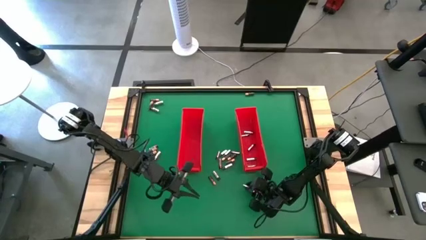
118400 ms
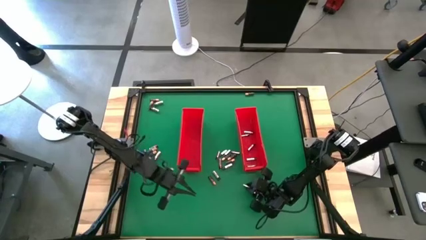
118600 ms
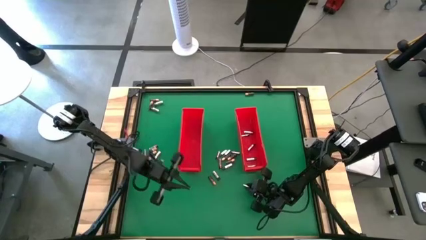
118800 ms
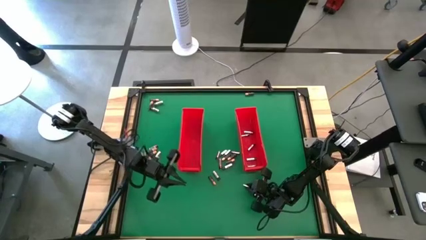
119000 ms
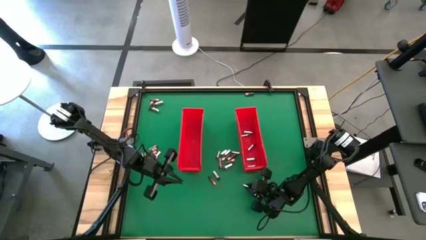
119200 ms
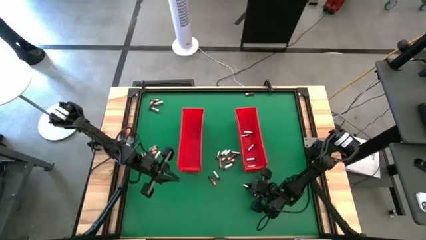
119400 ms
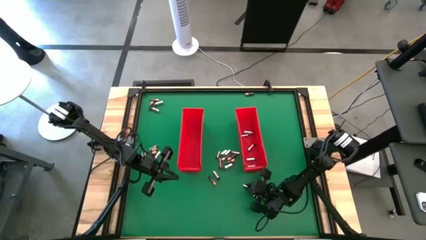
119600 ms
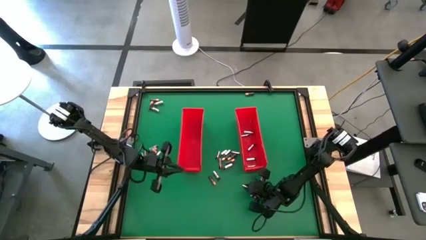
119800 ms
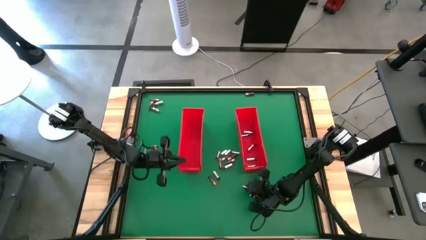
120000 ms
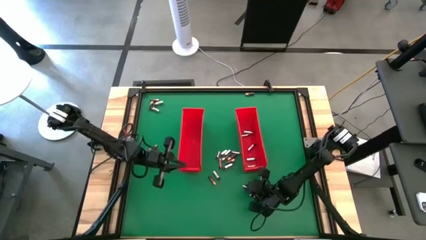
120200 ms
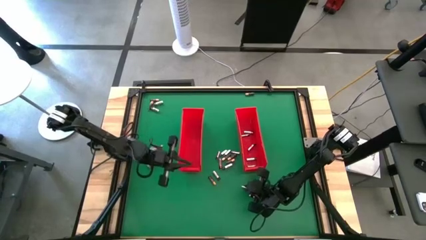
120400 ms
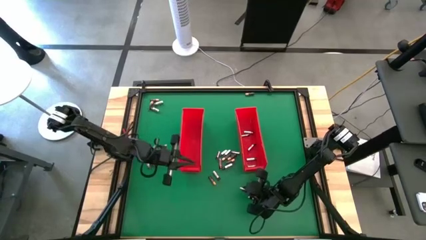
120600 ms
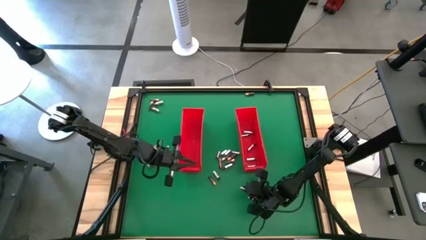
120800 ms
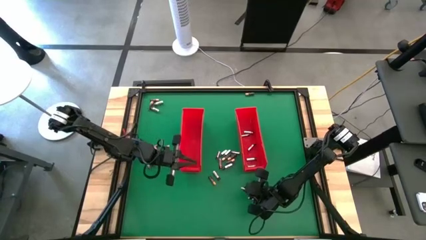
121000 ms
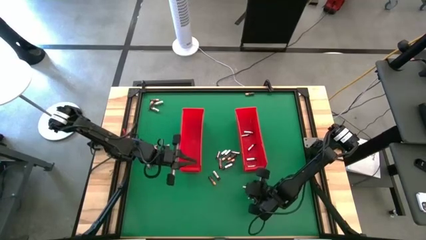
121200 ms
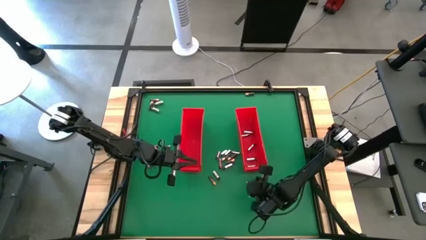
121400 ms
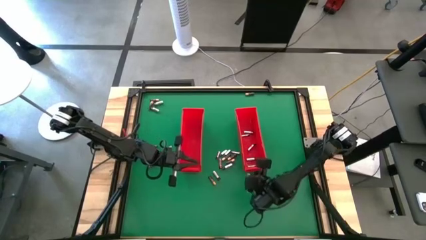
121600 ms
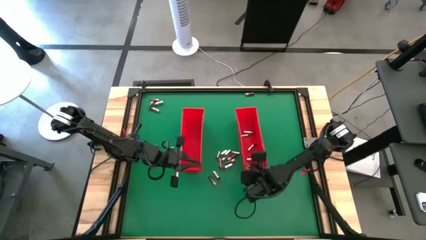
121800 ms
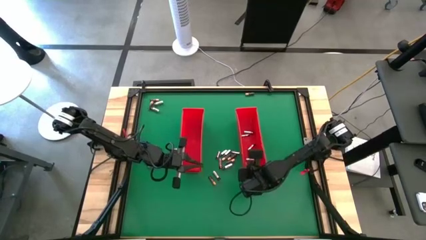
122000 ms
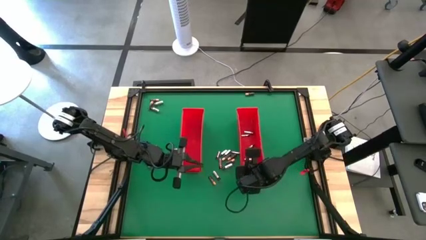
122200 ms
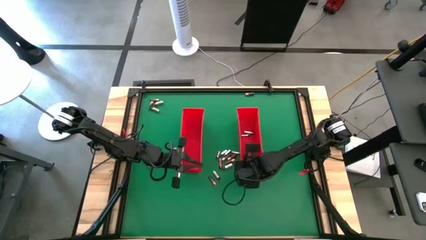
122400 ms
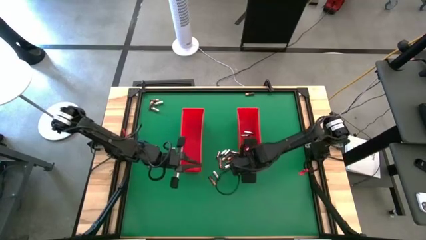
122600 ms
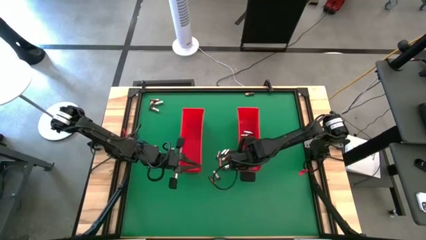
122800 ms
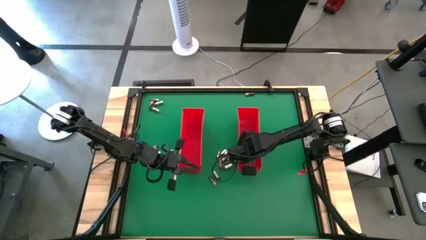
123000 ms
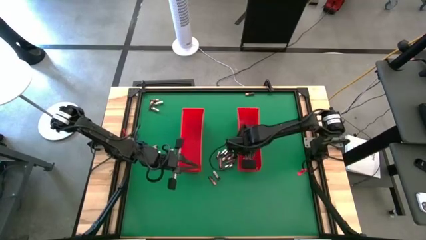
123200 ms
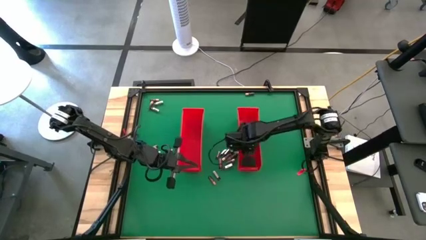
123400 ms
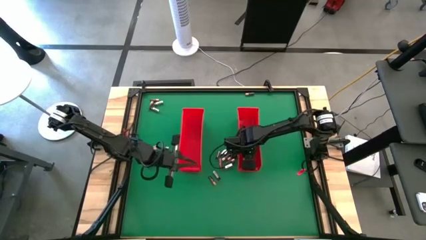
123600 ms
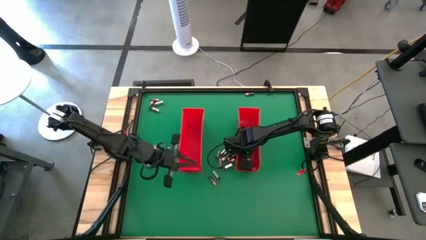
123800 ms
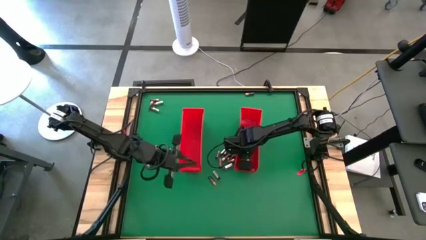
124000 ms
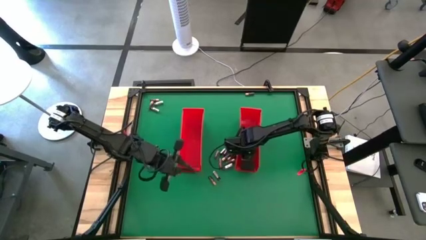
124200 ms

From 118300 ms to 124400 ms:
Task: Sort batteries
Put the silver battery into the right red bin

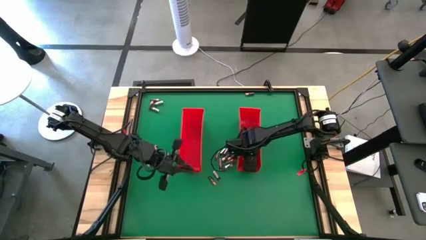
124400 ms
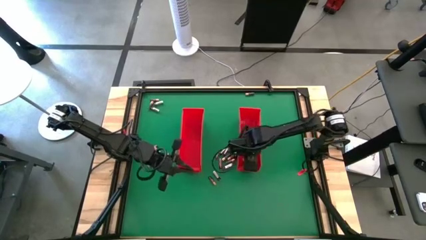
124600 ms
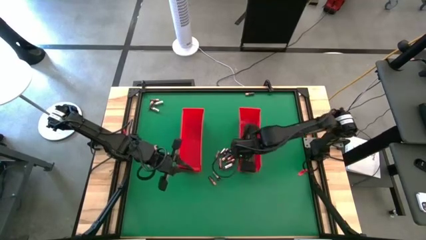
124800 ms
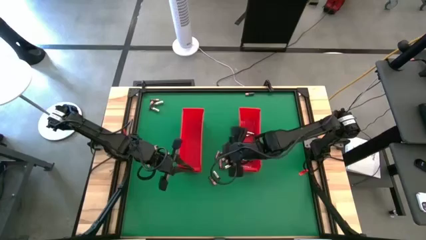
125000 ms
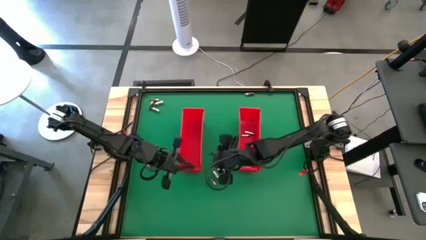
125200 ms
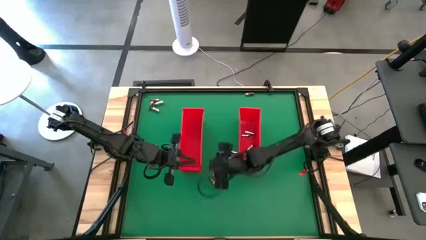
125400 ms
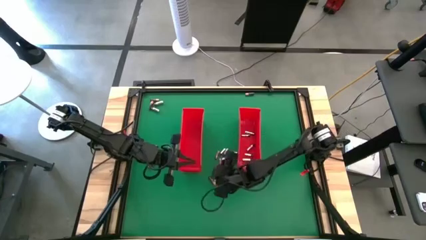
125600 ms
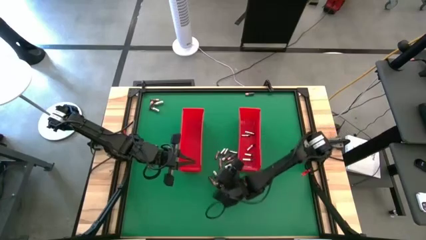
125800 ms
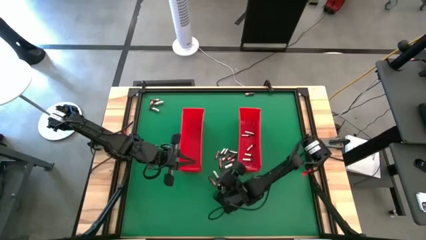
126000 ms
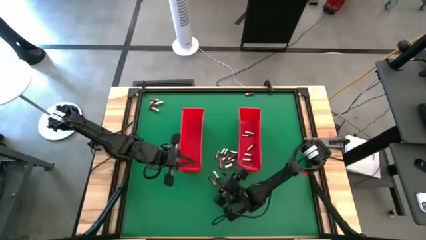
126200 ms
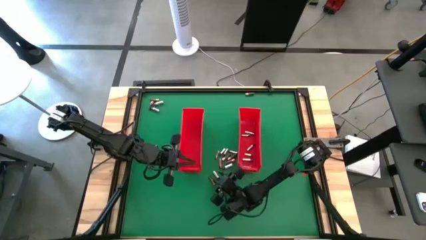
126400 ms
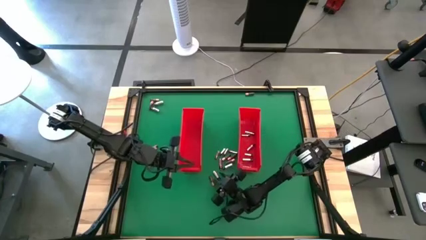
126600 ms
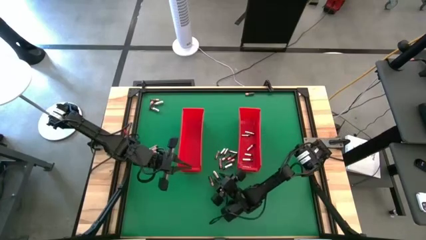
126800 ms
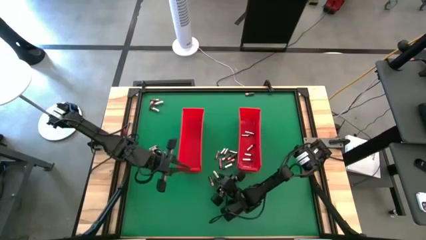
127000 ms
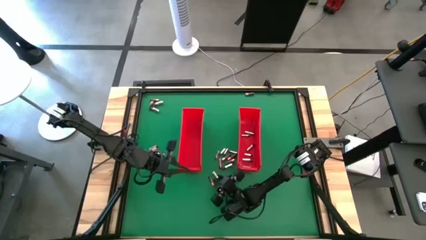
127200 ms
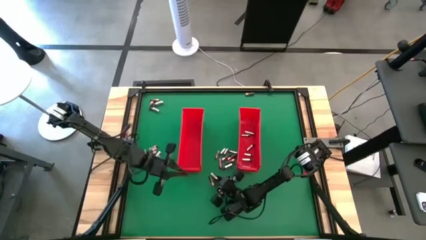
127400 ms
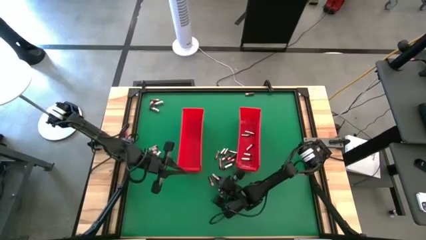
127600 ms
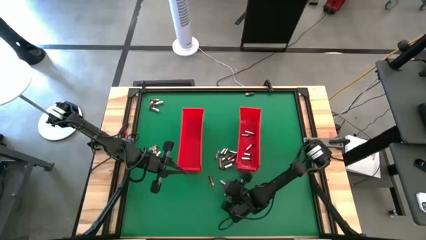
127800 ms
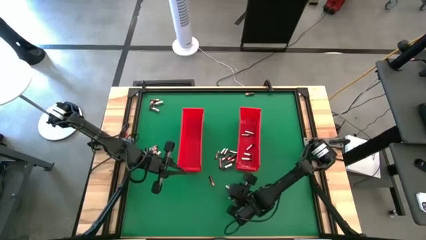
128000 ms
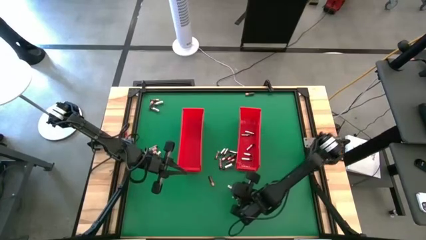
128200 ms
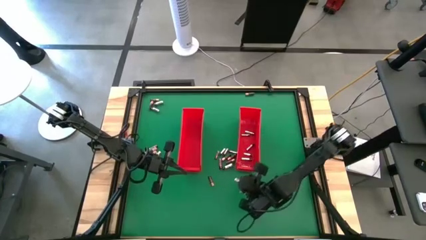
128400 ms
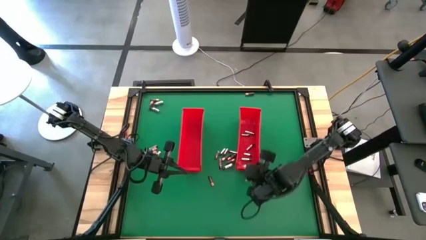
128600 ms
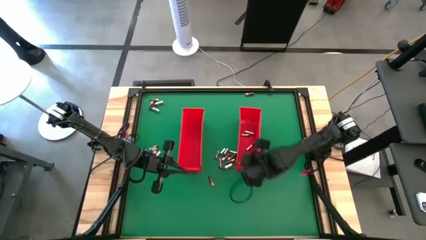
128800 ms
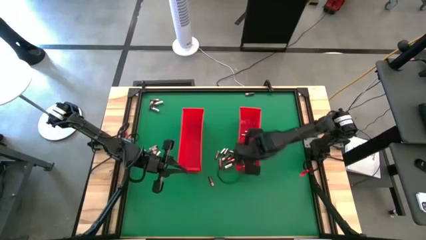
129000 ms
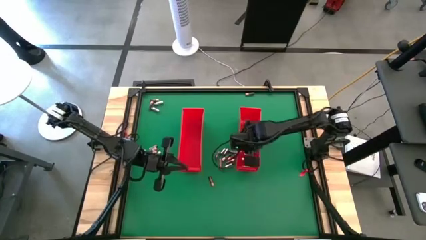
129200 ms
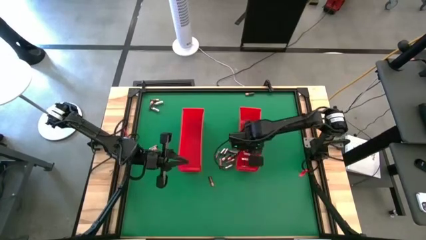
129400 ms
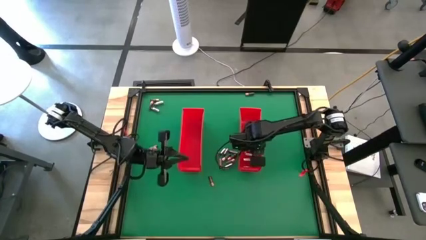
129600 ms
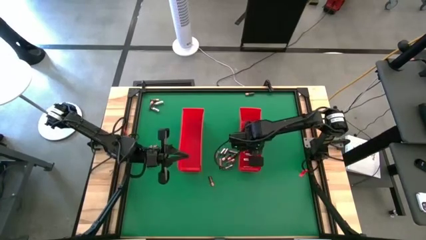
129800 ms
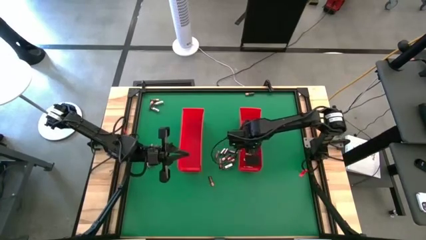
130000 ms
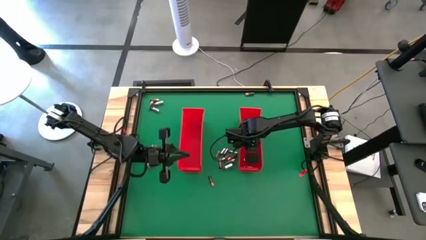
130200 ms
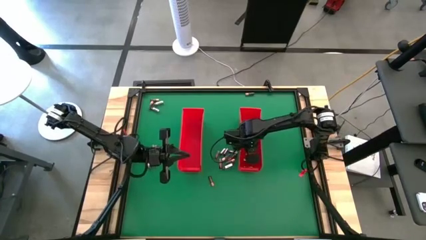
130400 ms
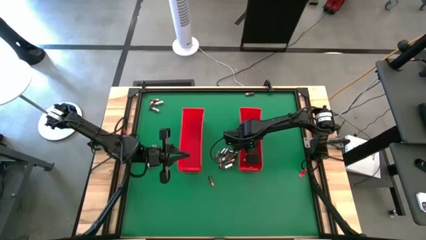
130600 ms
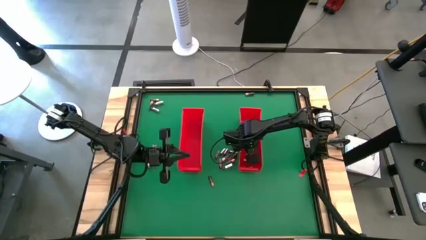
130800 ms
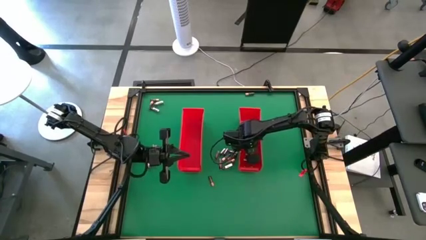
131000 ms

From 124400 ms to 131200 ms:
Put the silver battery into the right red bin
